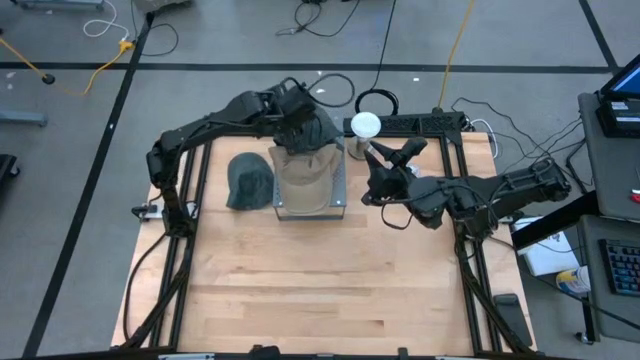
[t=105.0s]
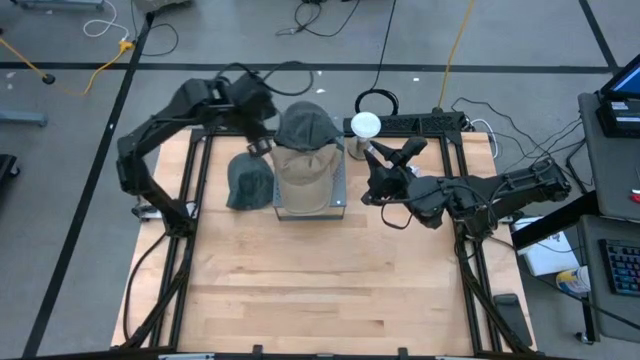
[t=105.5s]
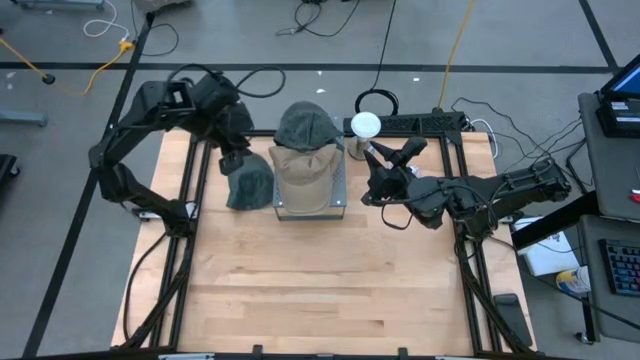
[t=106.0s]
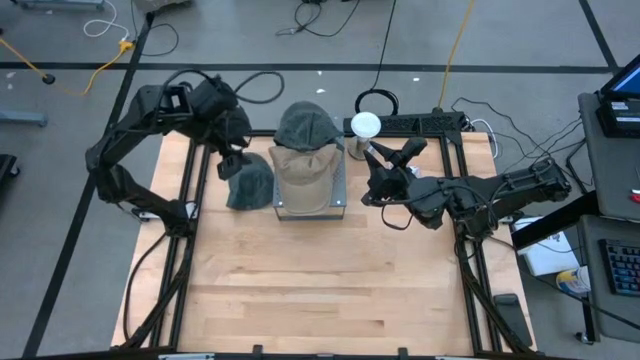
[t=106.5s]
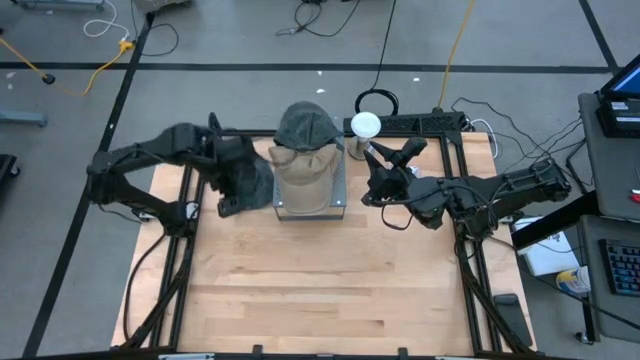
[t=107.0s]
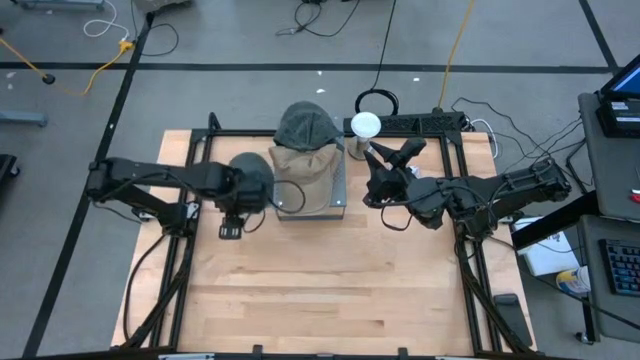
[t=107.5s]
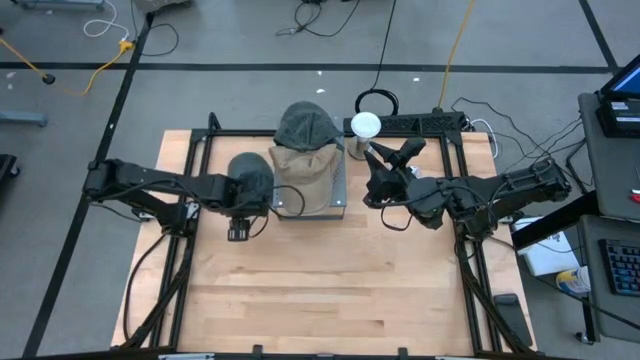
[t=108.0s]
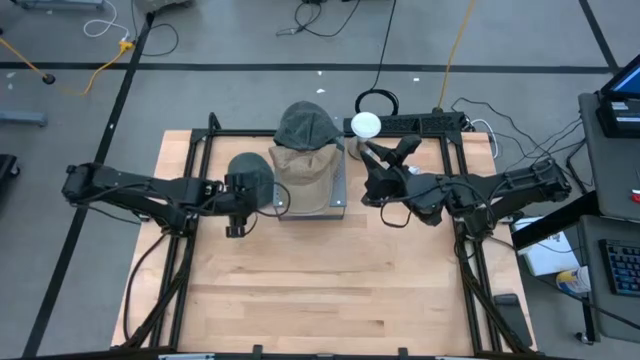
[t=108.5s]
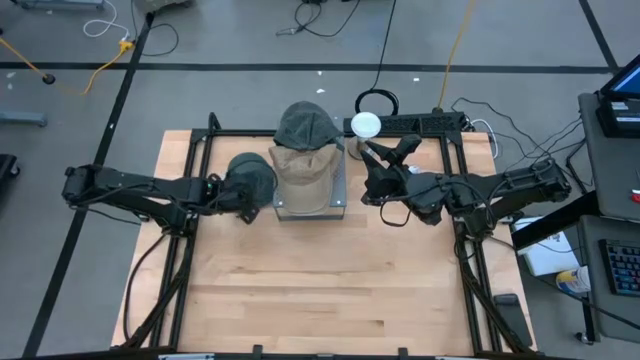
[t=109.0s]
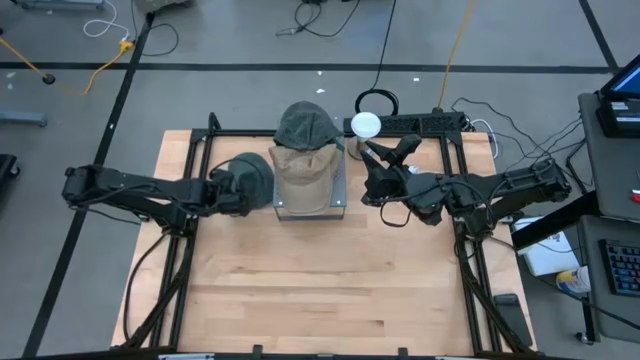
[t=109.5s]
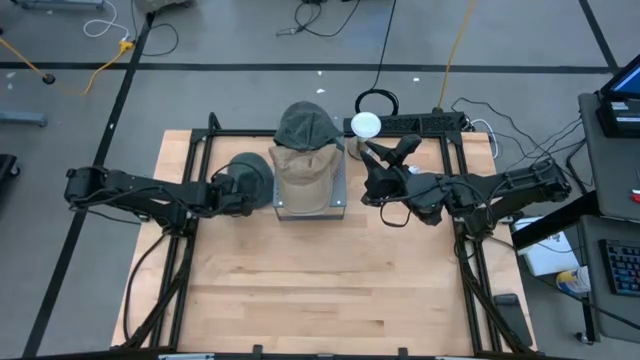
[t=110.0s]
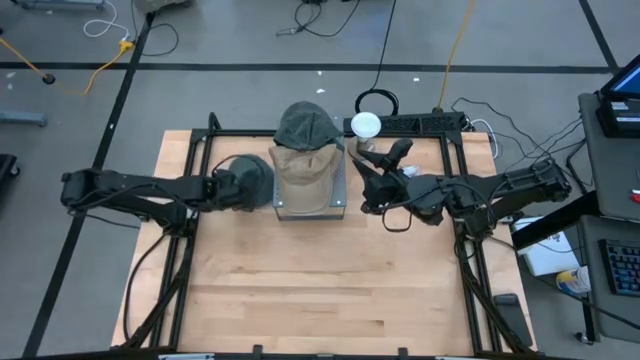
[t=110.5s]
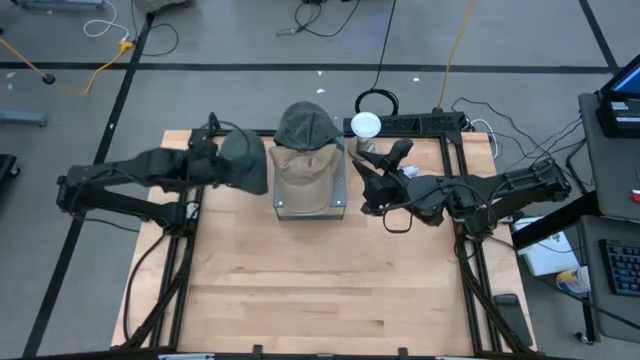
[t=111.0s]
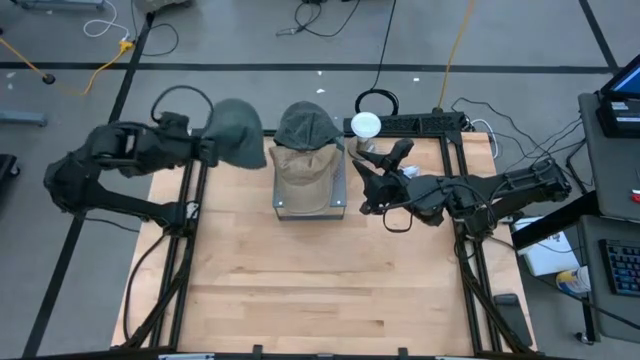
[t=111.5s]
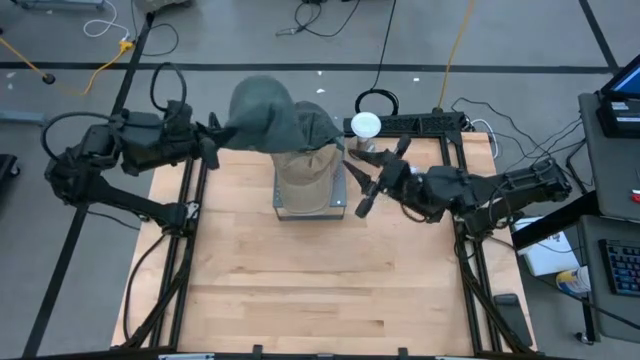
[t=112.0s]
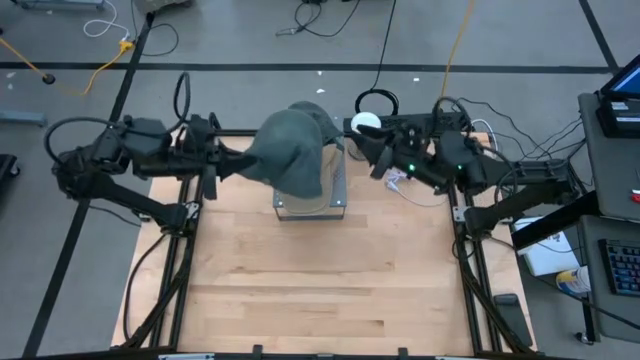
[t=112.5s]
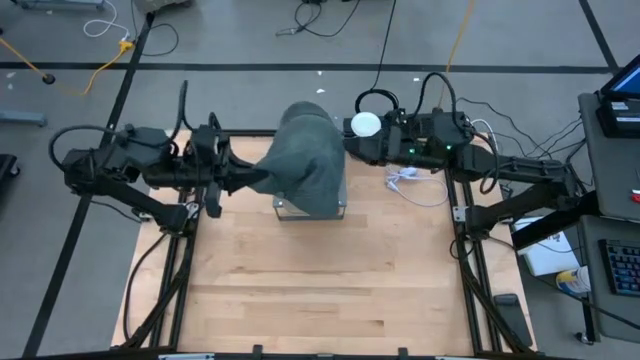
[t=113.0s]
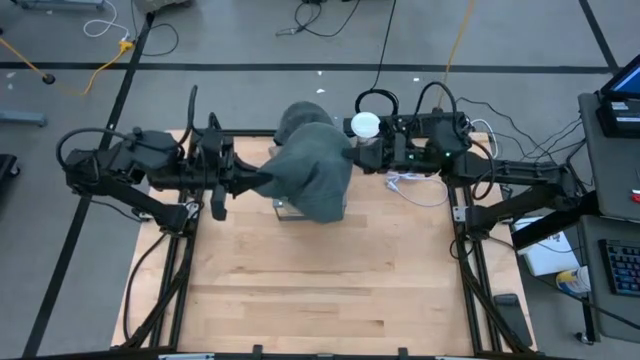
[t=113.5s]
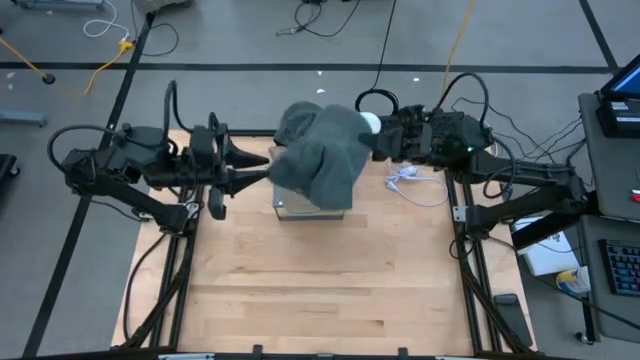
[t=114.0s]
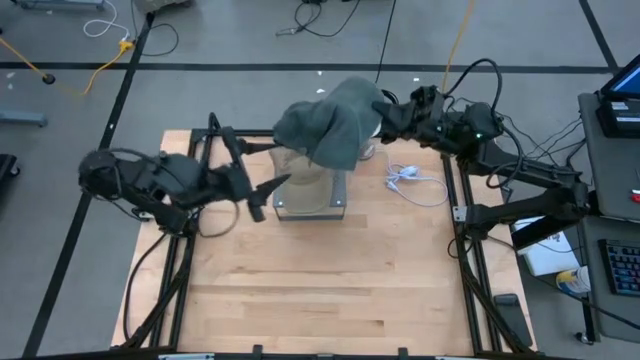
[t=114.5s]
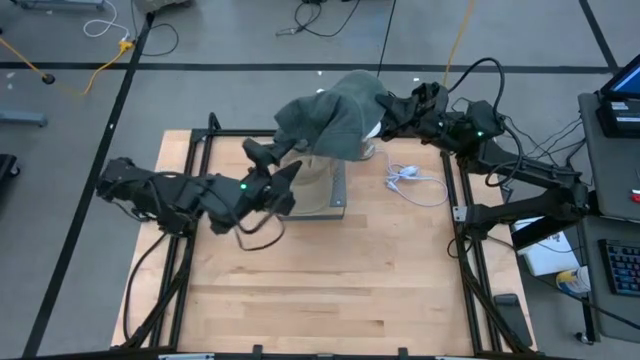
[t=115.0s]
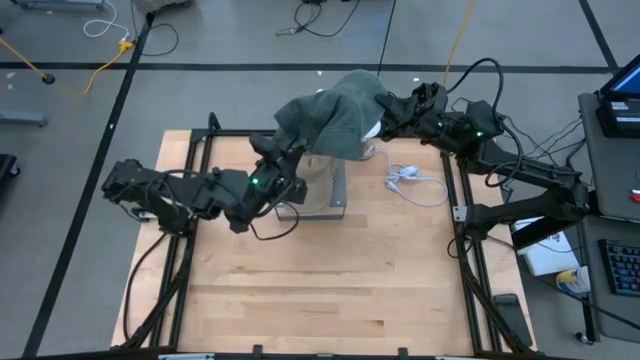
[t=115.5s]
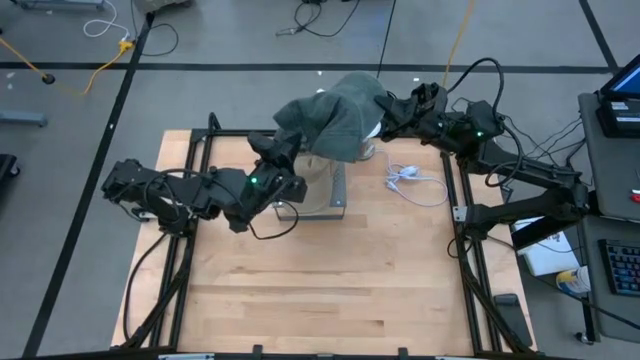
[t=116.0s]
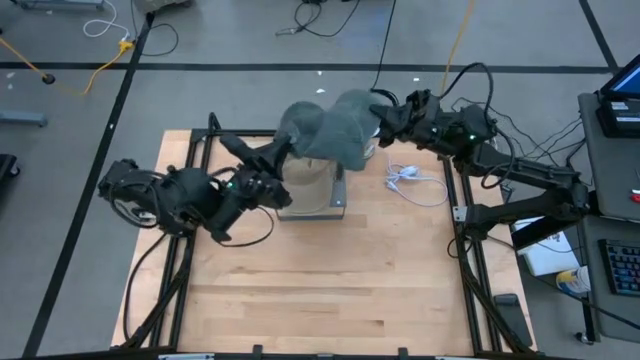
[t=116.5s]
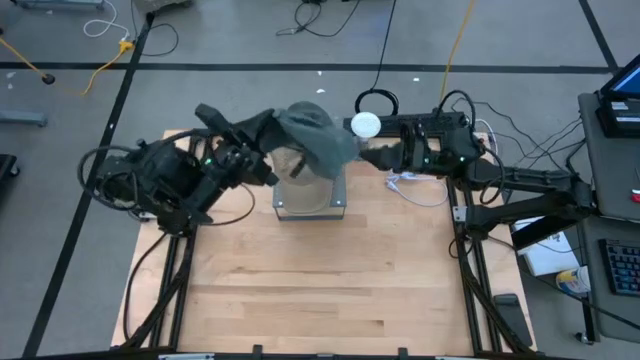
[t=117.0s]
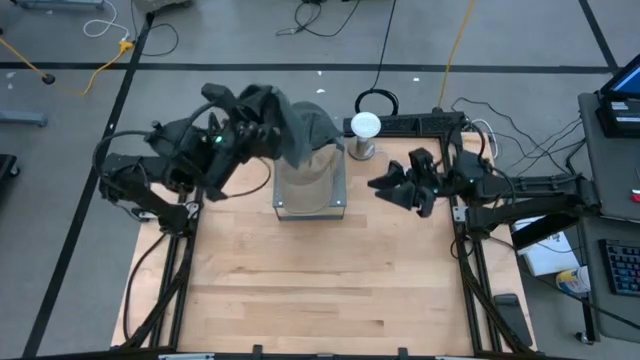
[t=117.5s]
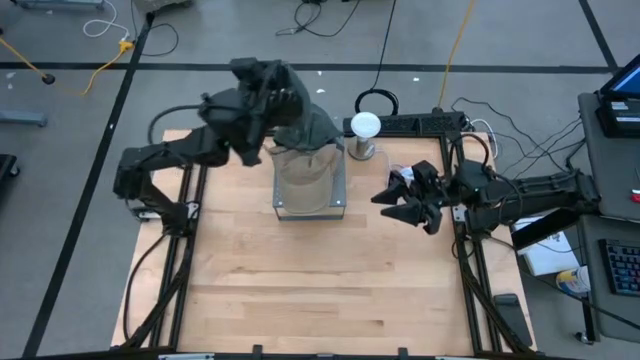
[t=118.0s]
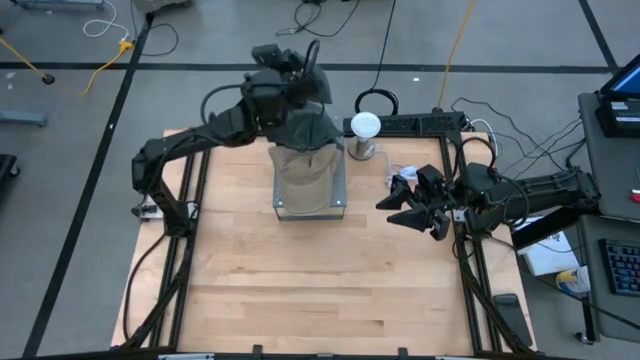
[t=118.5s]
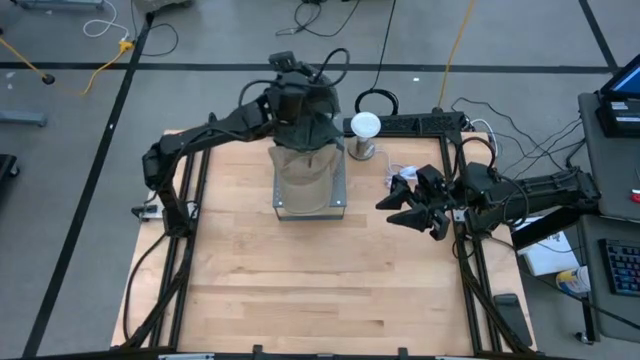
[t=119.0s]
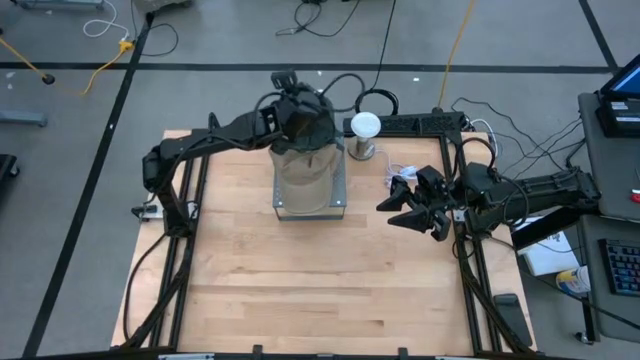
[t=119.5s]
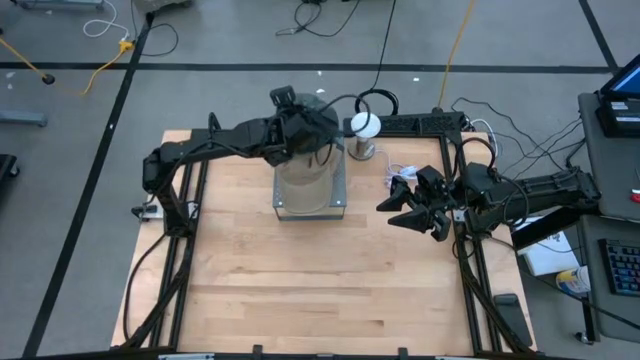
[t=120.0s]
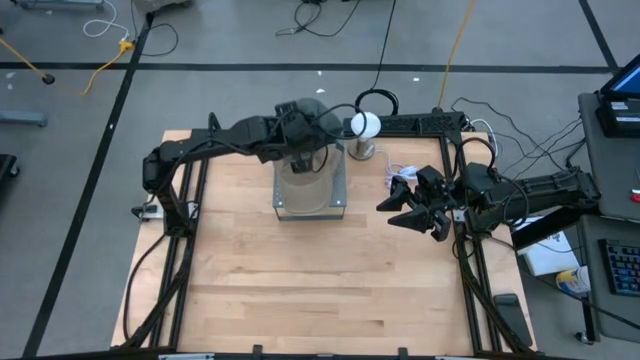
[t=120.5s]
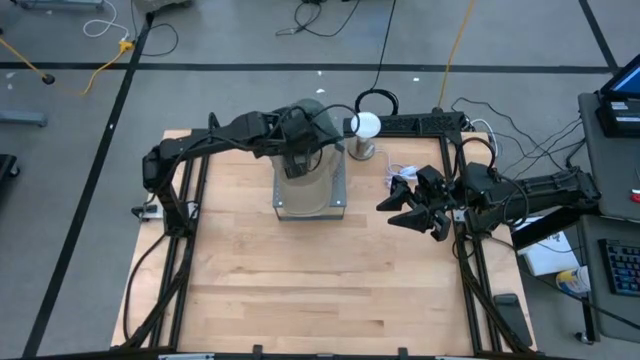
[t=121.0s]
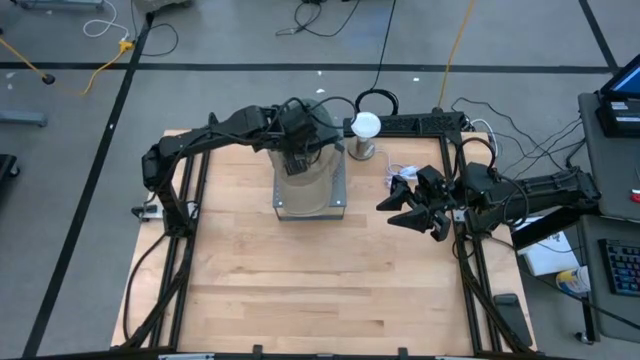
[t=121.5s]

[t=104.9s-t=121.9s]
Task: Pick & Place hat
Stack the black cap on the stacked black caps on the shelf

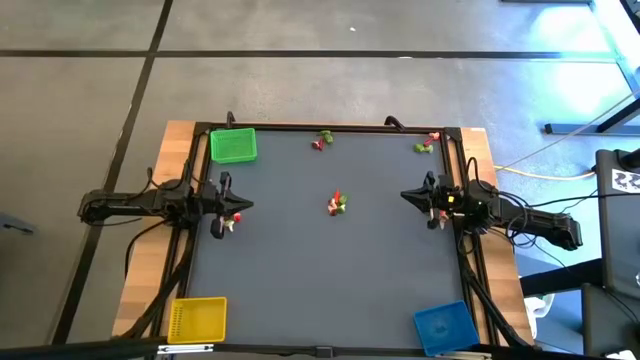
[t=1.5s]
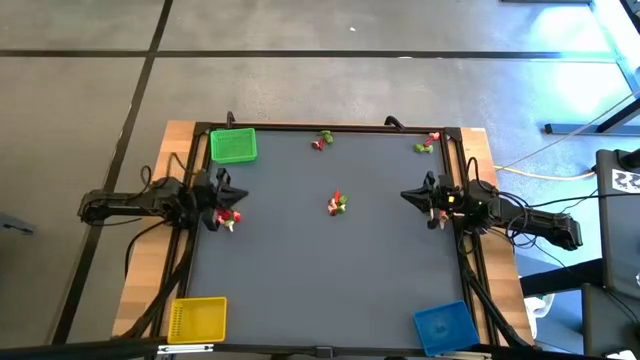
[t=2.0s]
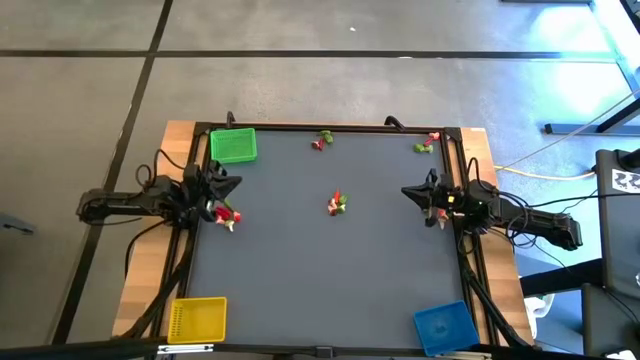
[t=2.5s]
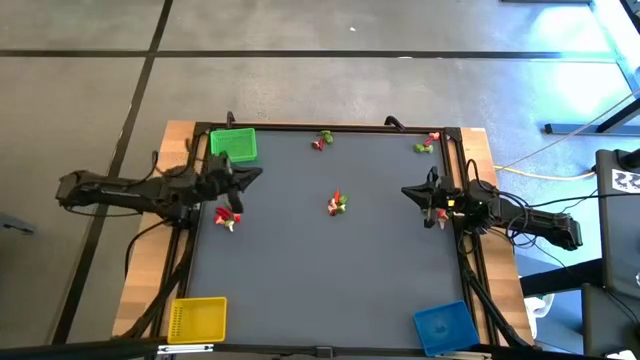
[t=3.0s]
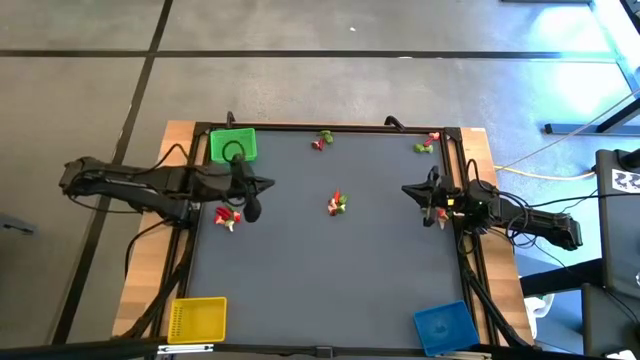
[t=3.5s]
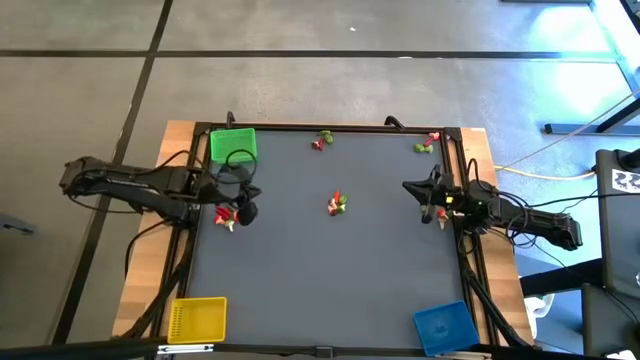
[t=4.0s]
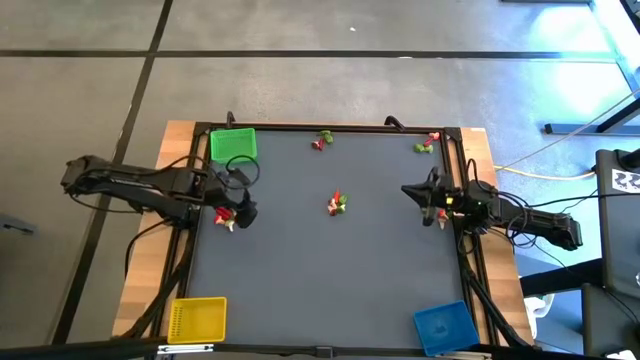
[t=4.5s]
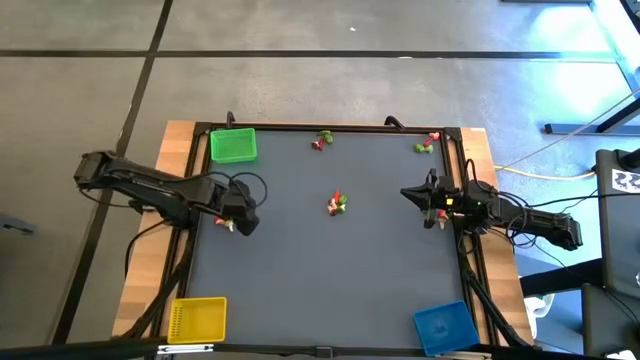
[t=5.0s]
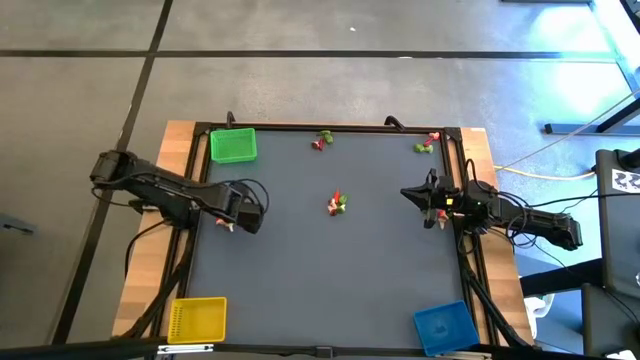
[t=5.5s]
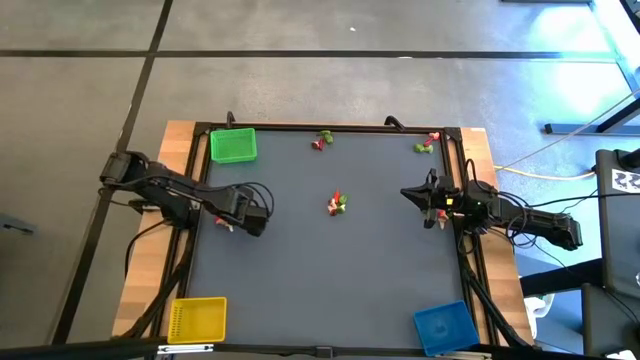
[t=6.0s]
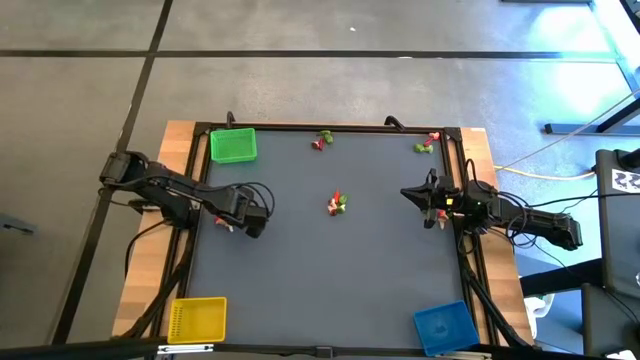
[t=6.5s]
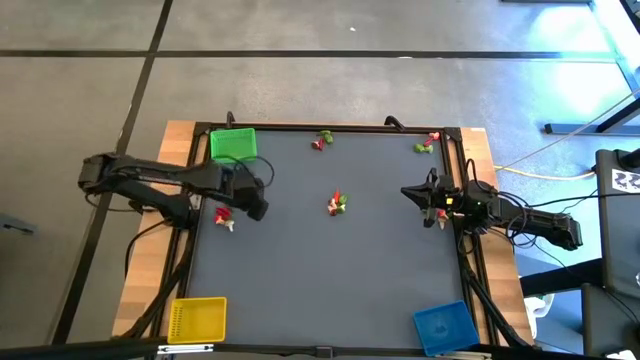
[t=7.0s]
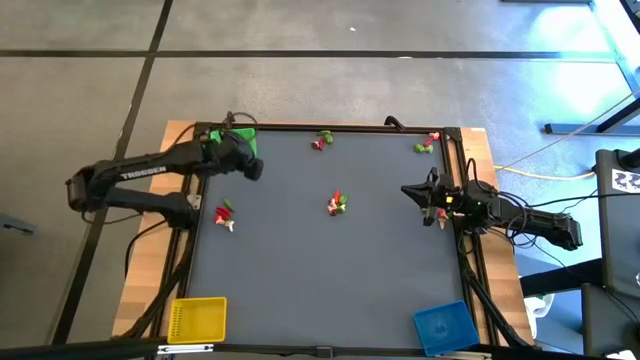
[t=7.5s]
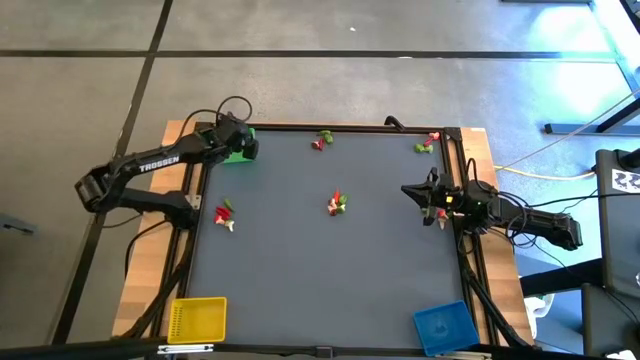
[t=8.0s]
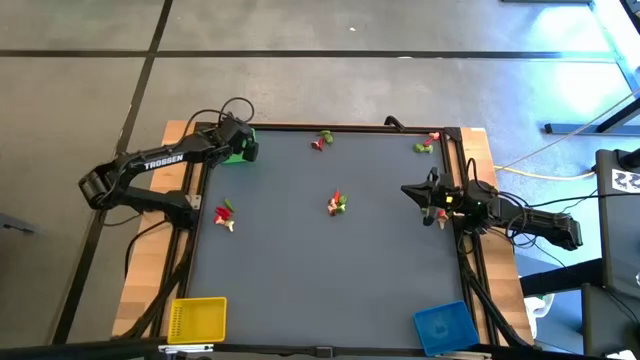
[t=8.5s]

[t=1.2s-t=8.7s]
Task: Sort produce into baskets
Put the red mushroom into the green bin
